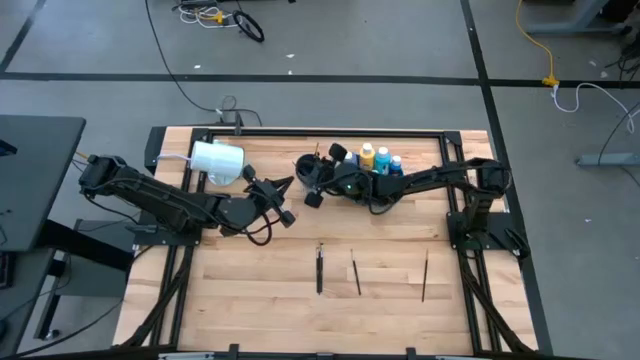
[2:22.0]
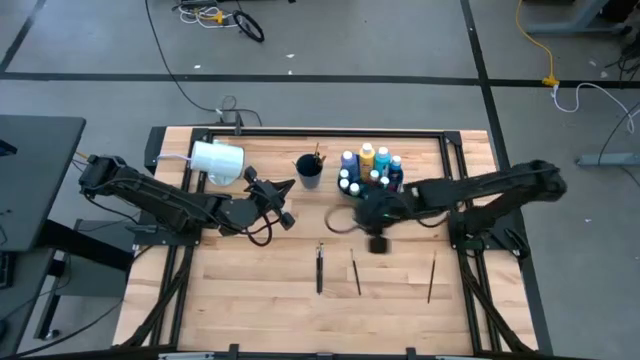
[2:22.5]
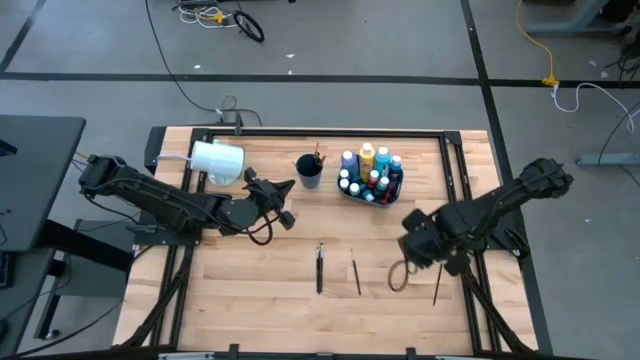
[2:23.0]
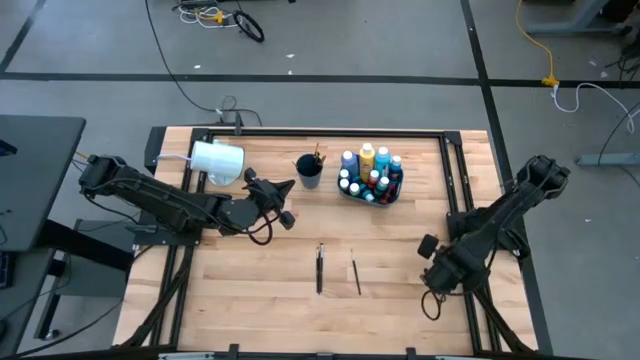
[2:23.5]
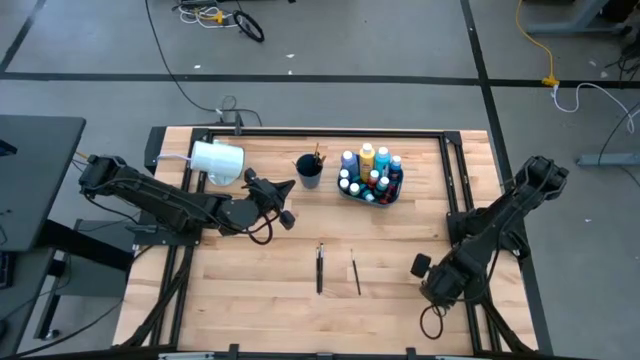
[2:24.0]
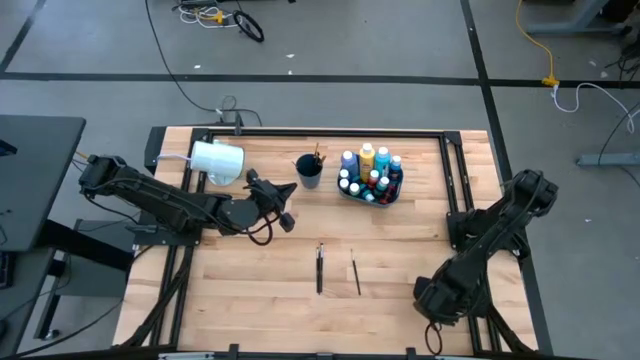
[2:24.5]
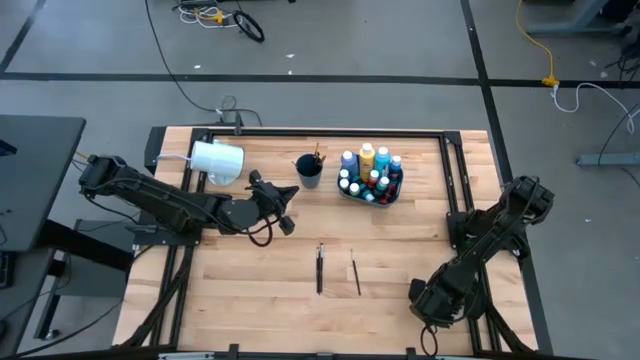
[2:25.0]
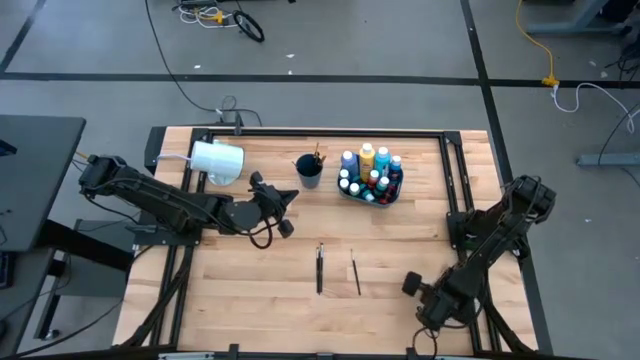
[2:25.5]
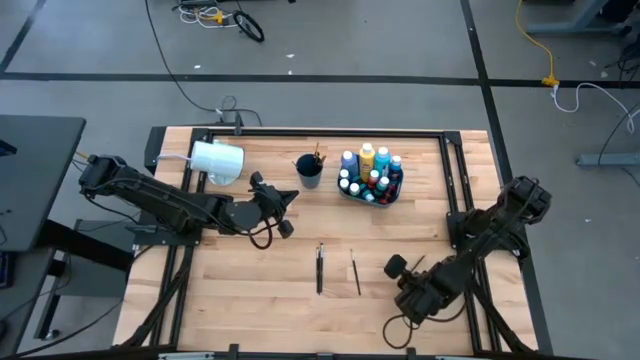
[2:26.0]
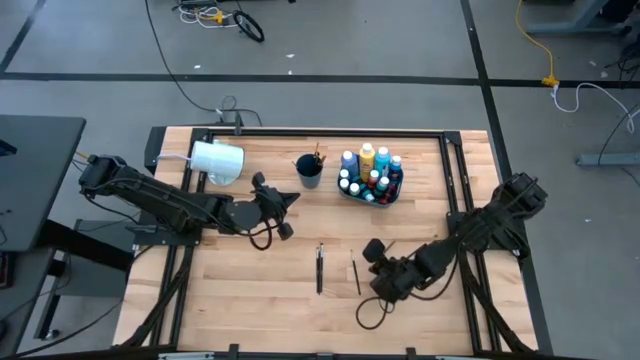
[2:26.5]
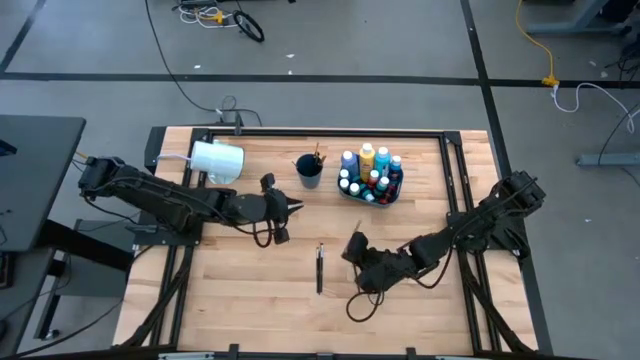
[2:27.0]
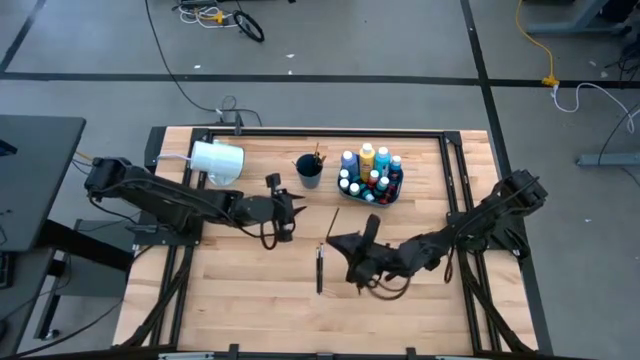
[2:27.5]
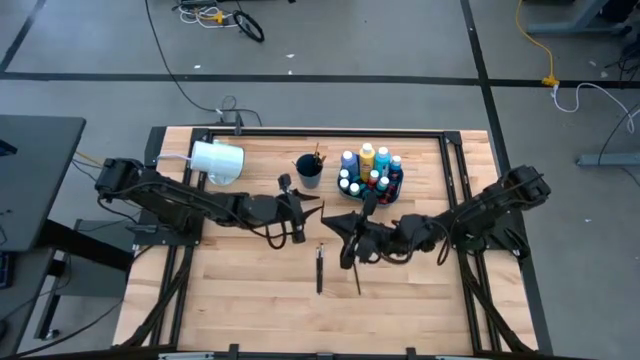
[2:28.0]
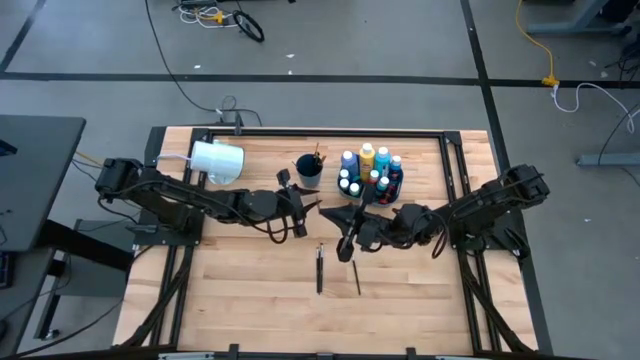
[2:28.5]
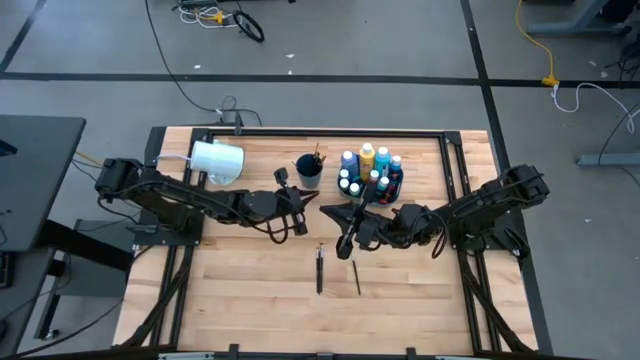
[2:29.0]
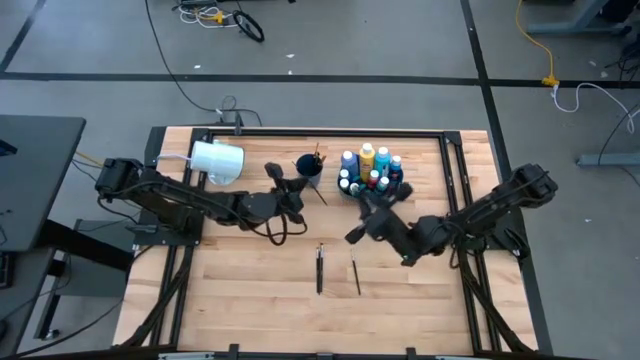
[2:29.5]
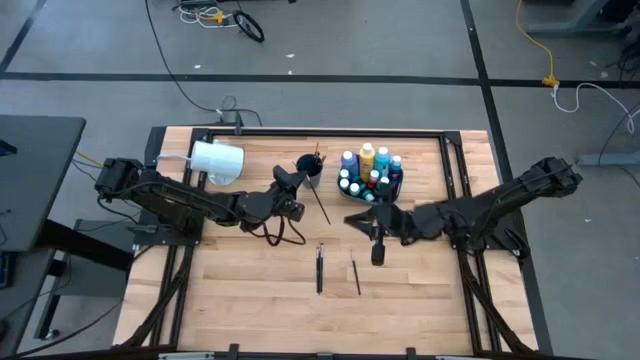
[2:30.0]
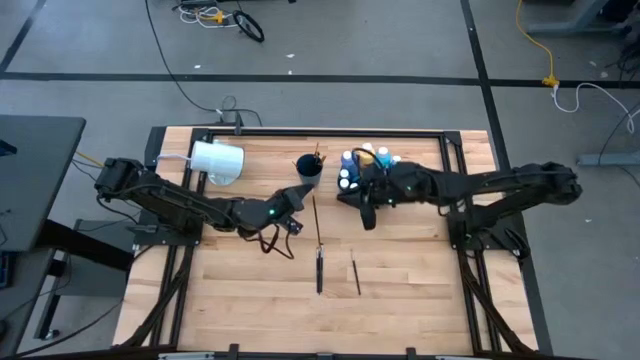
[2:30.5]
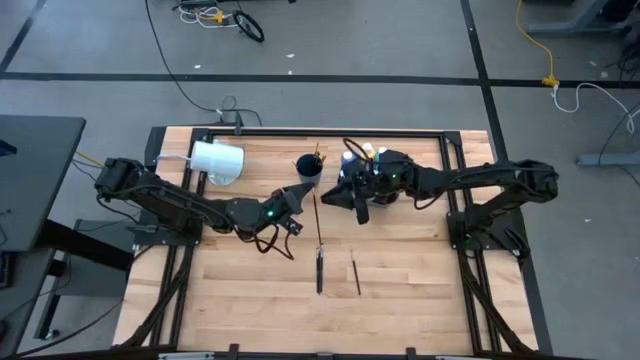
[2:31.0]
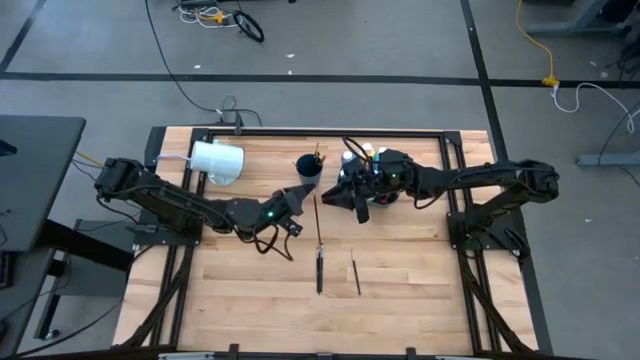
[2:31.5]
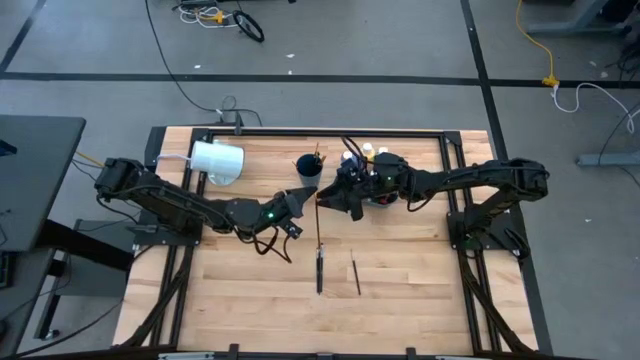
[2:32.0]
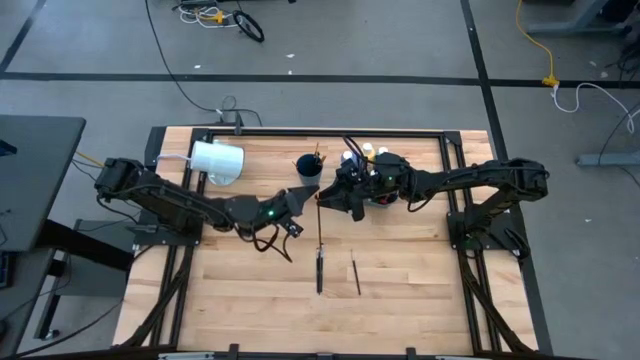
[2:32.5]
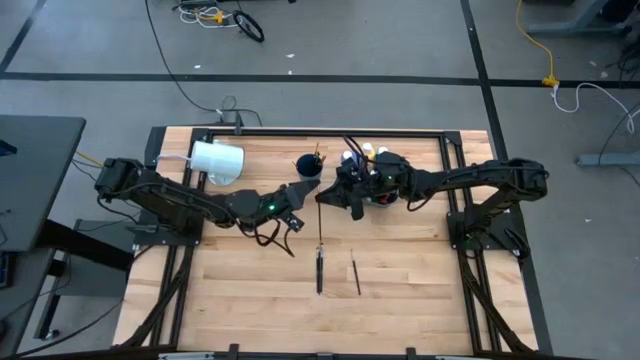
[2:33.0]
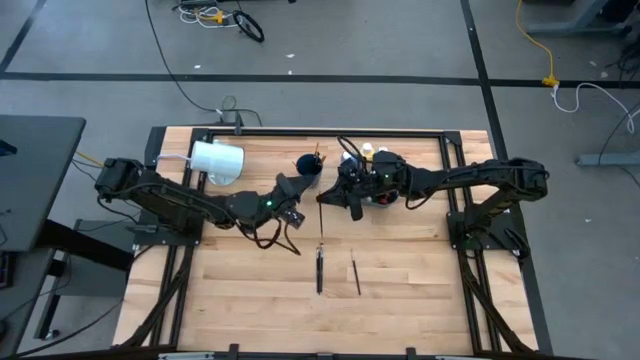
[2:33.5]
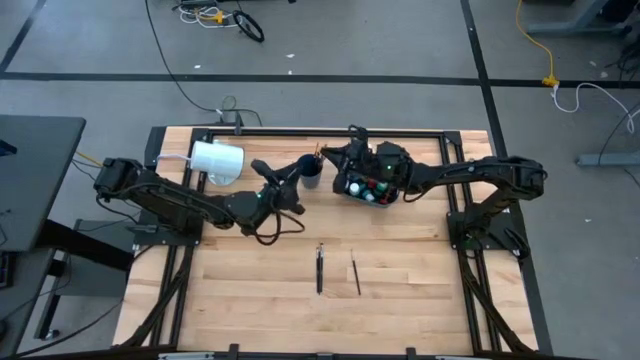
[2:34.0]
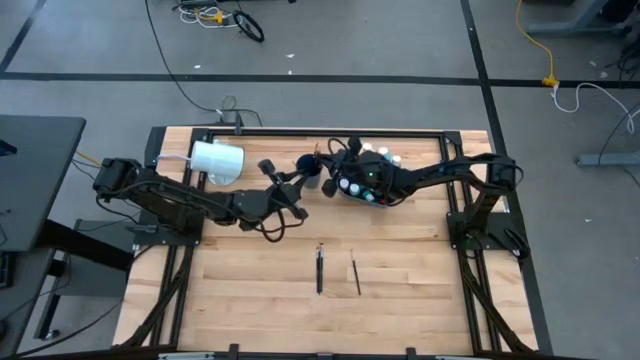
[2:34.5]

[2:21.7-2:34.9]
Task: Pick & Place Paint Supplies
Put the gold paint brush into the blue cup

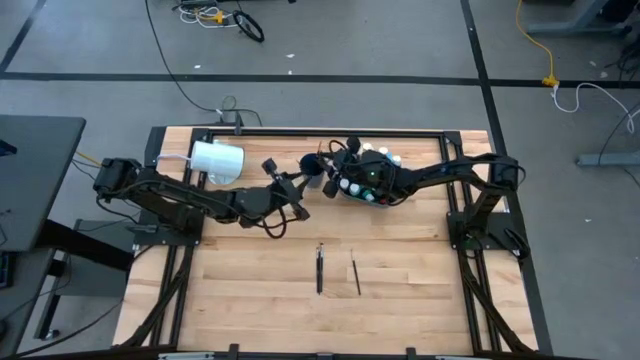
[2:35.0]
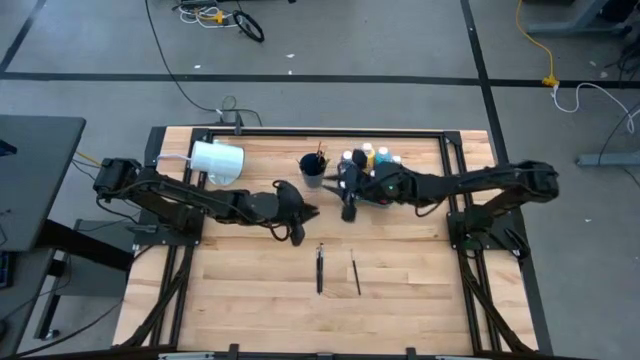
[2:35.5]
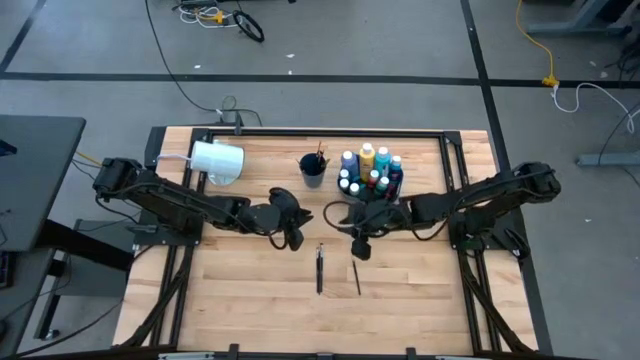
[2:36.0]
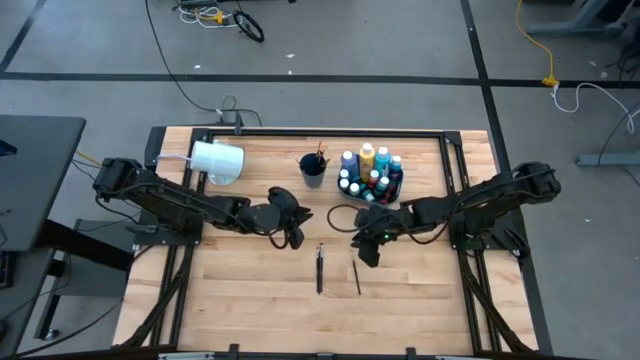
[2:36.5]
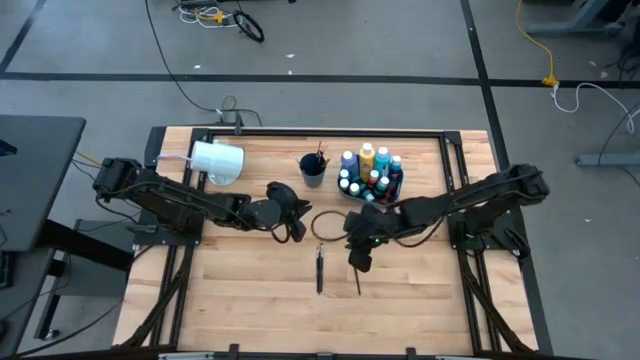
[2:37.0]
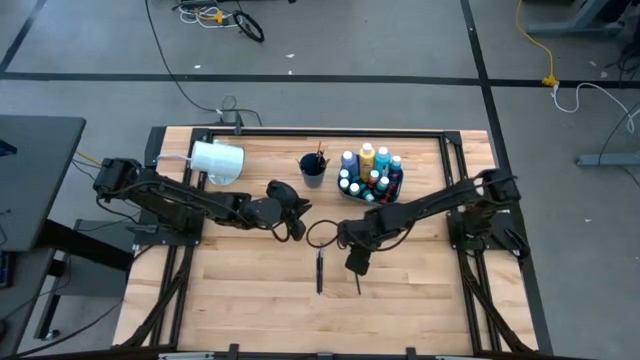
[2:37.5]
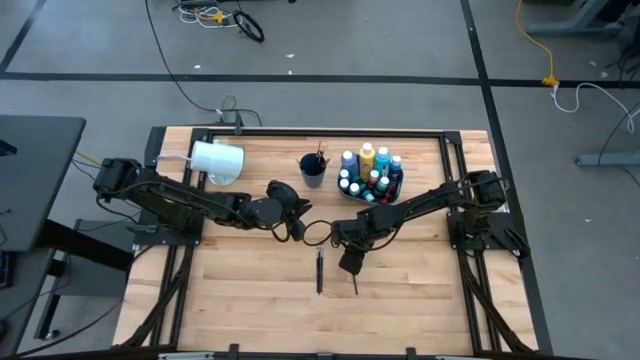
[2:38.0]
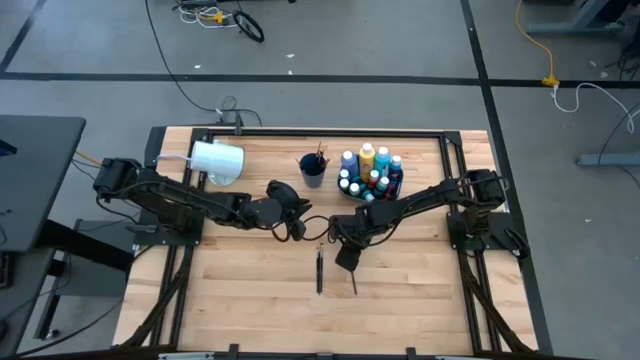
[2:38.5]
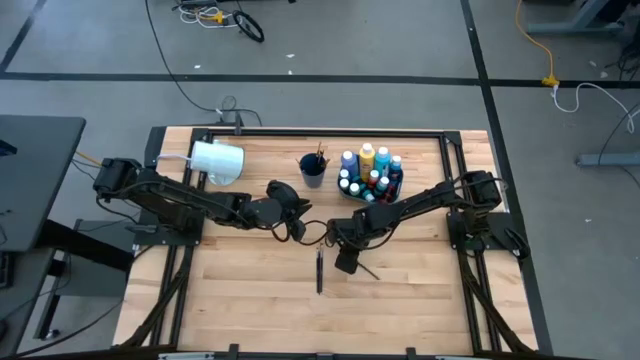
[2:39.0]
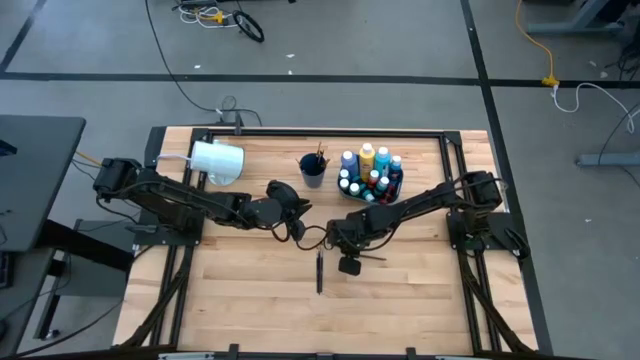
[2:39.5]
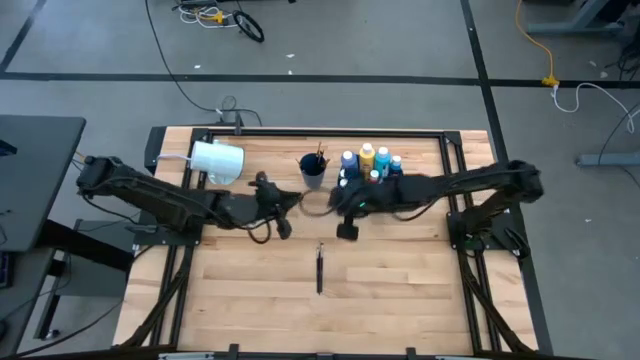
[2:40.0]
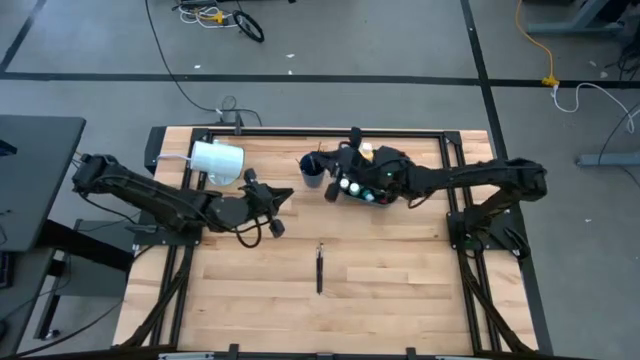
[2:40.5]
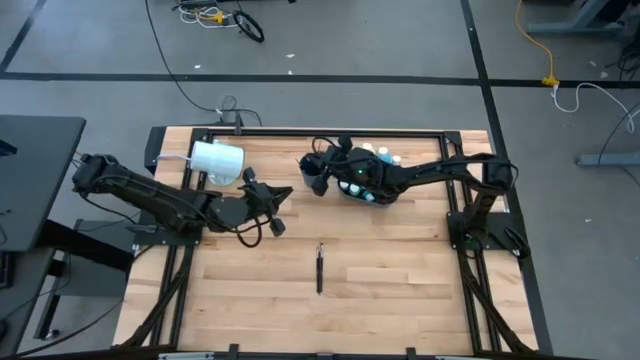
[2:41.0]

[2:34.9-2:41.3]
Put the silver paint brush into the blue cup

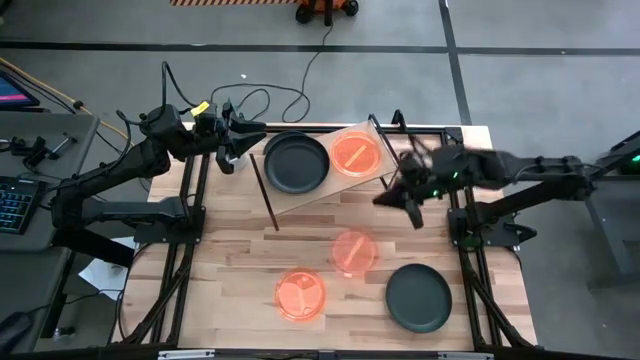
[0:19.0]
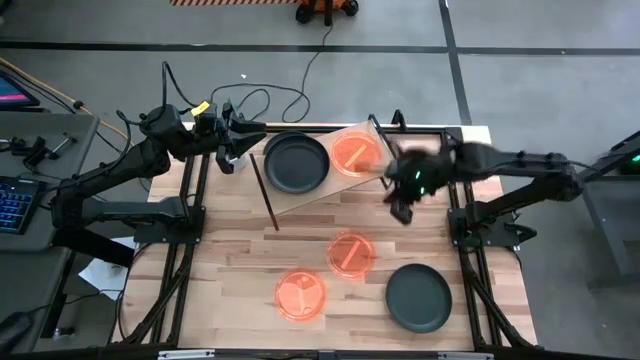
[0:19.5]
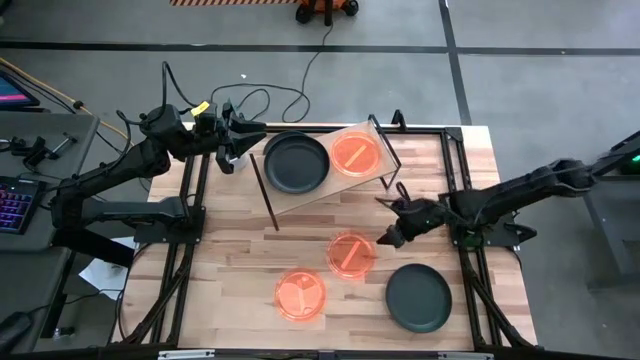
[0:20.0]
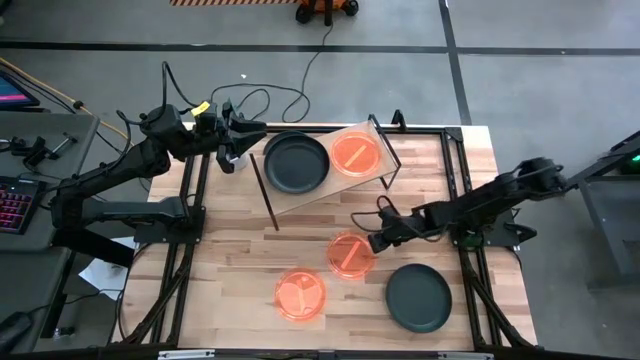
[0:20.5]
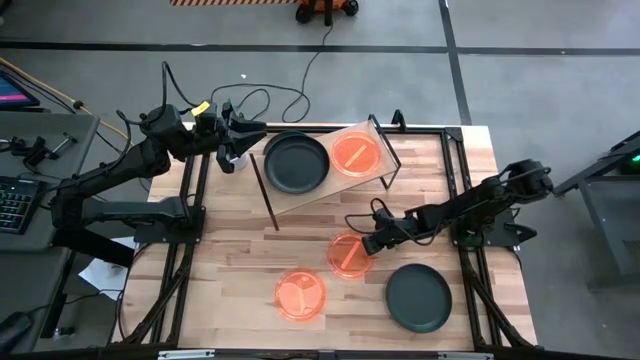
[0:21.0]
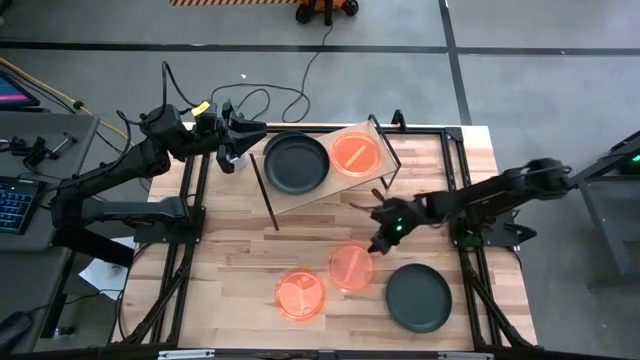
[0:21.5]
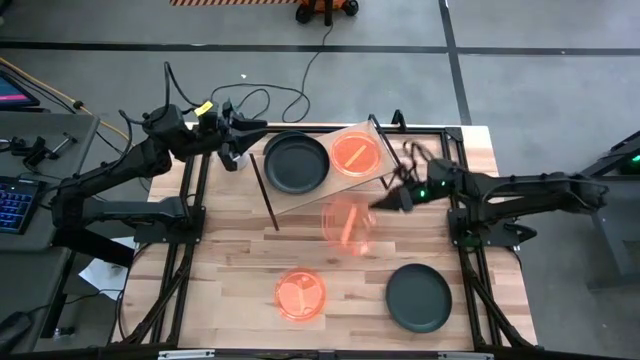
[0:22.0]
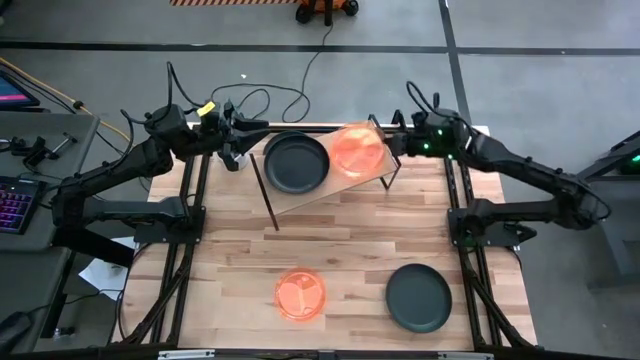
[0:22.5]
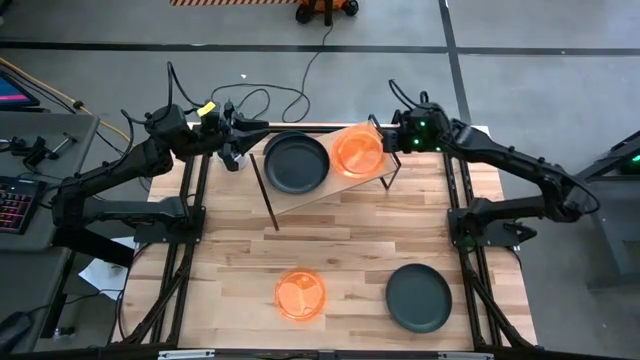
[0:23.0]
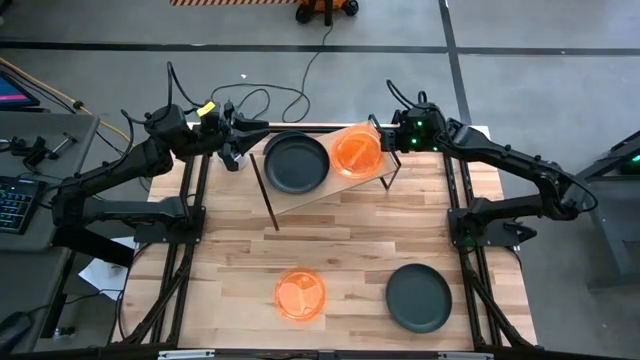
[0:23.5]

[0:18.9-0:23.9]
Task: Place and stack plates onto a shelf
Stack the right orange plate on top of the orange plate on the shelf
